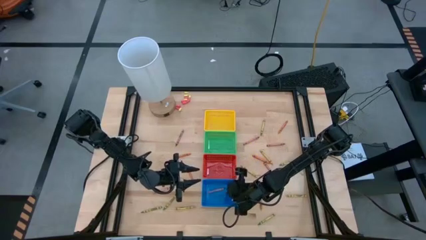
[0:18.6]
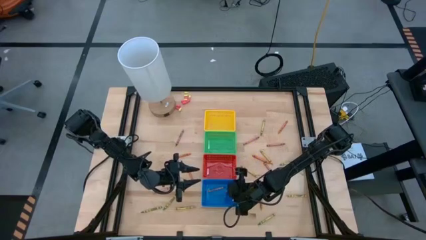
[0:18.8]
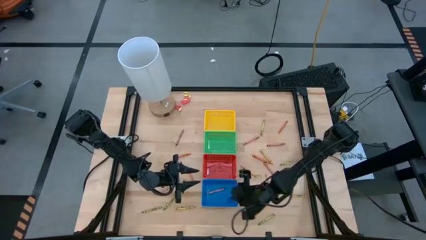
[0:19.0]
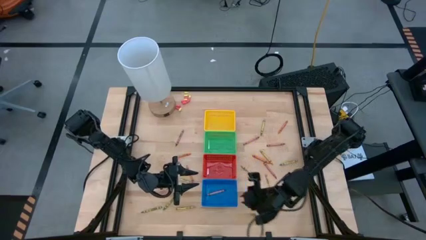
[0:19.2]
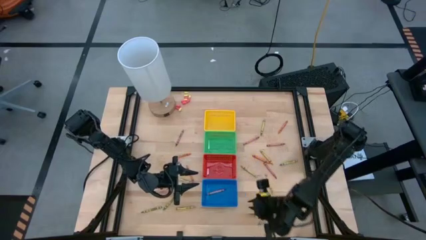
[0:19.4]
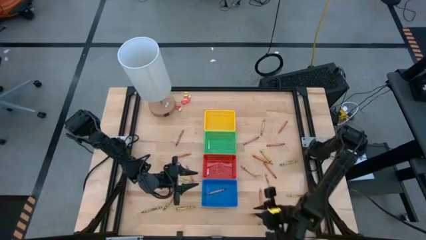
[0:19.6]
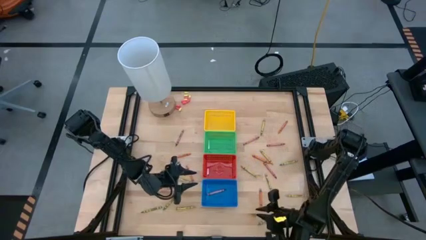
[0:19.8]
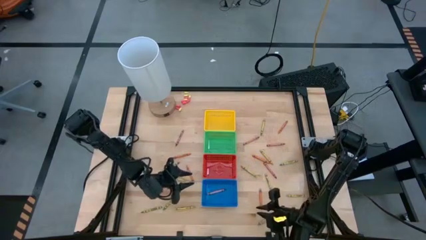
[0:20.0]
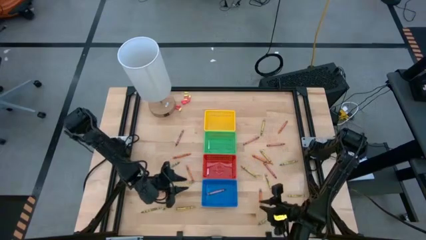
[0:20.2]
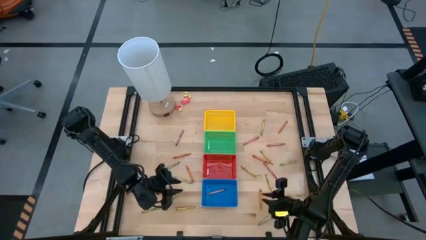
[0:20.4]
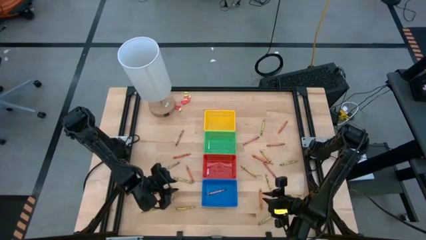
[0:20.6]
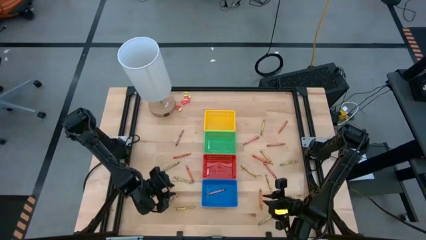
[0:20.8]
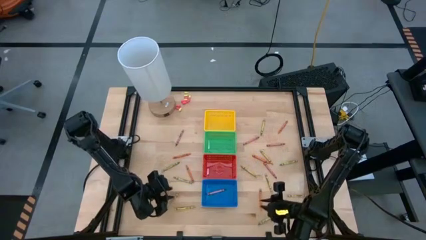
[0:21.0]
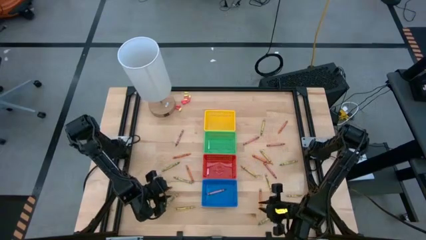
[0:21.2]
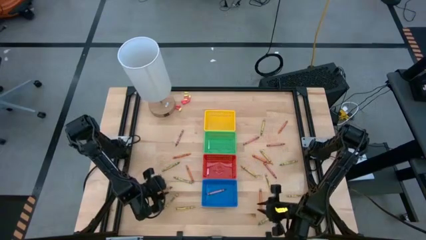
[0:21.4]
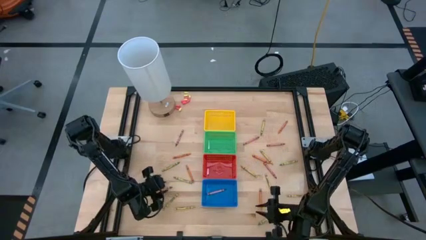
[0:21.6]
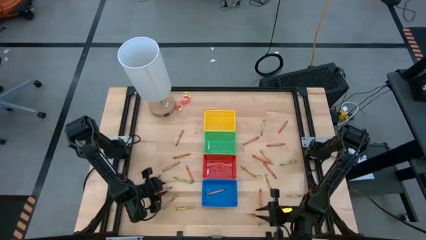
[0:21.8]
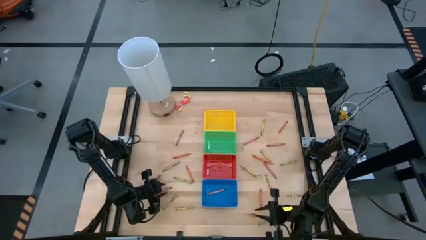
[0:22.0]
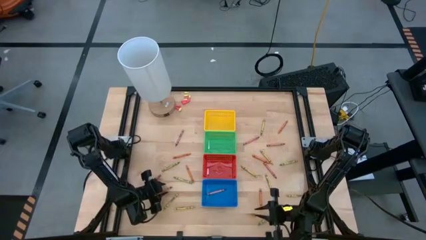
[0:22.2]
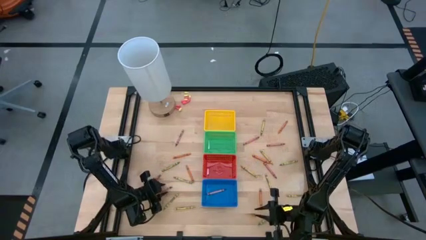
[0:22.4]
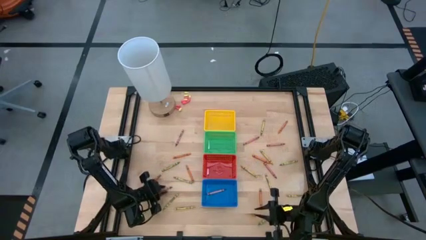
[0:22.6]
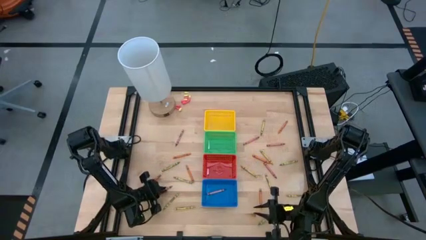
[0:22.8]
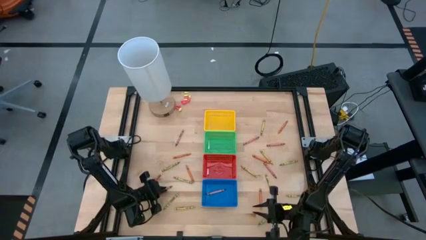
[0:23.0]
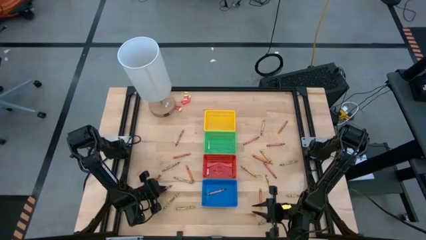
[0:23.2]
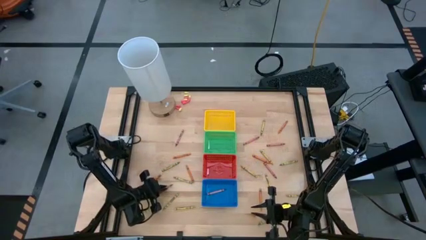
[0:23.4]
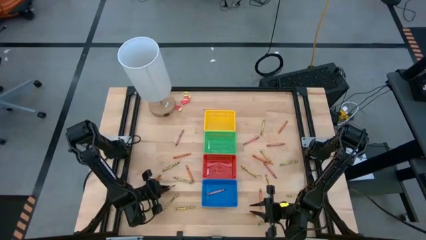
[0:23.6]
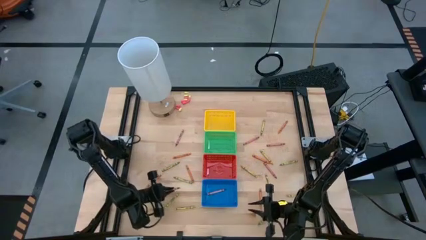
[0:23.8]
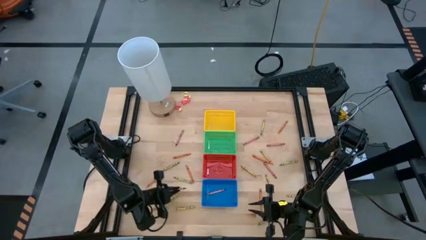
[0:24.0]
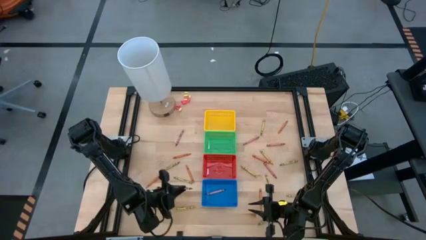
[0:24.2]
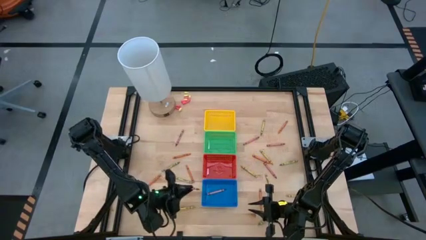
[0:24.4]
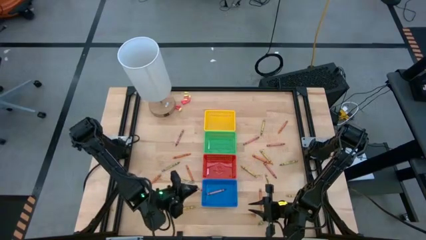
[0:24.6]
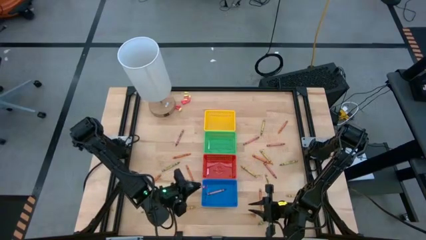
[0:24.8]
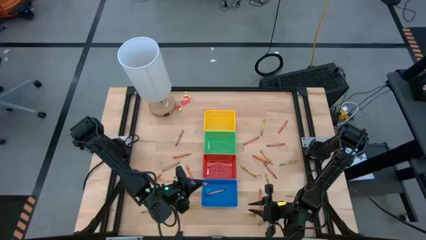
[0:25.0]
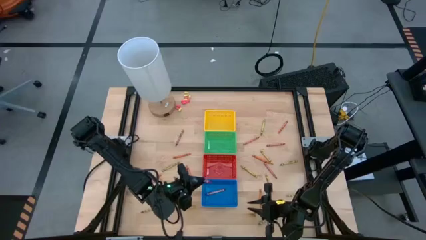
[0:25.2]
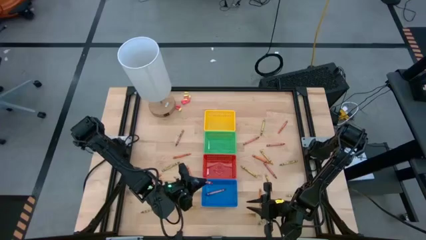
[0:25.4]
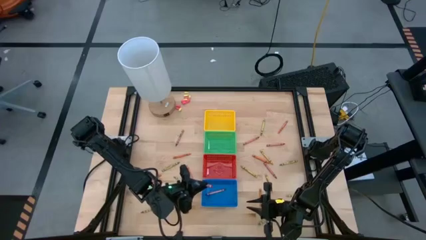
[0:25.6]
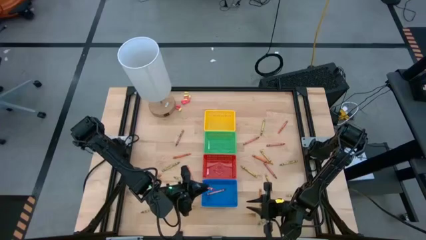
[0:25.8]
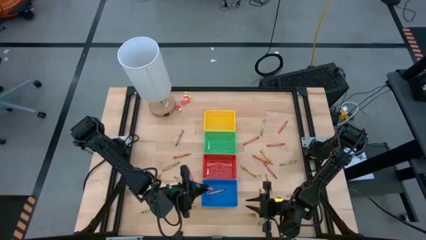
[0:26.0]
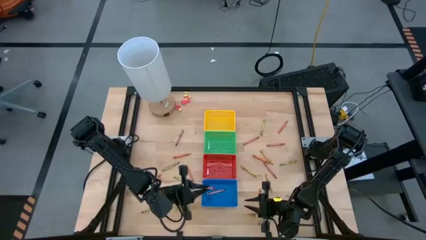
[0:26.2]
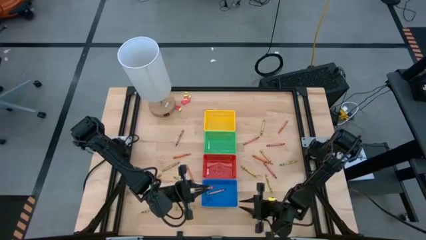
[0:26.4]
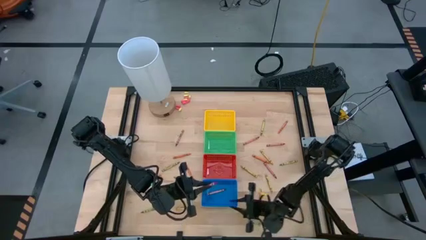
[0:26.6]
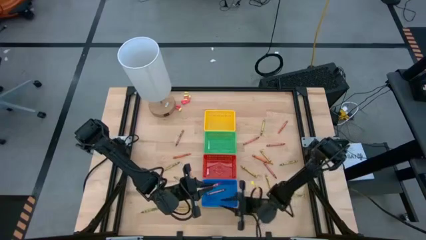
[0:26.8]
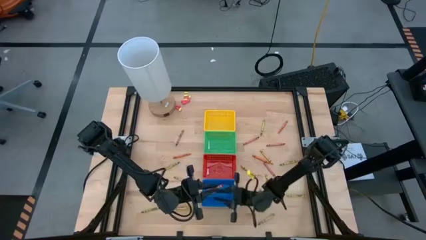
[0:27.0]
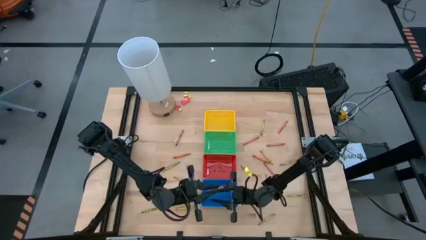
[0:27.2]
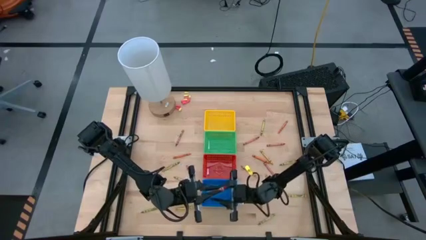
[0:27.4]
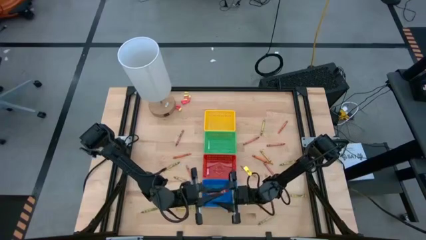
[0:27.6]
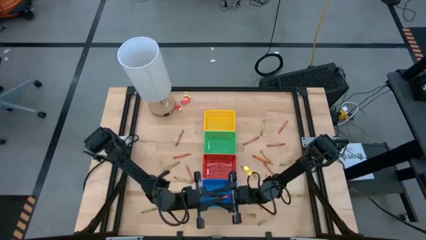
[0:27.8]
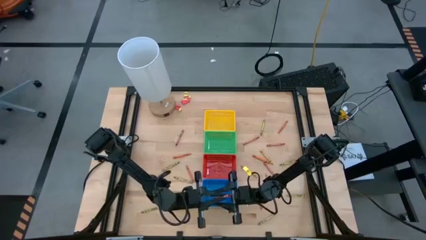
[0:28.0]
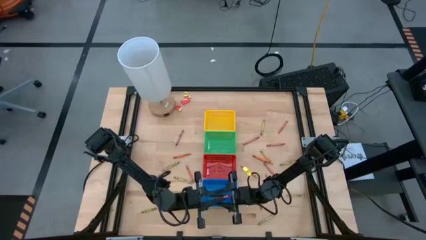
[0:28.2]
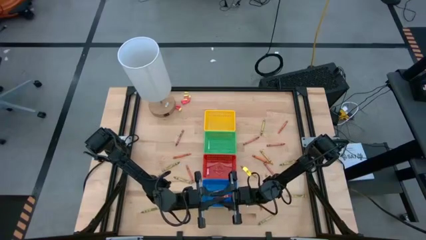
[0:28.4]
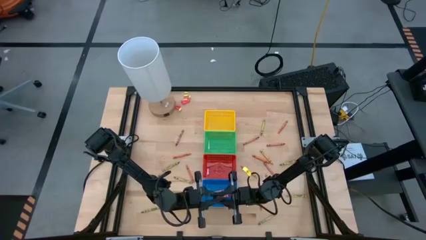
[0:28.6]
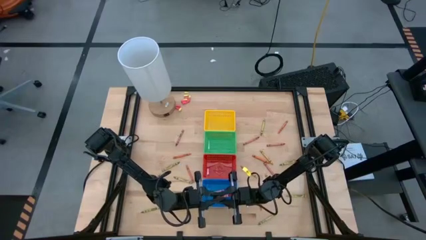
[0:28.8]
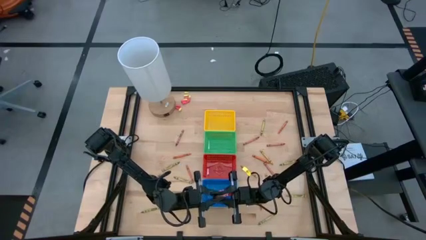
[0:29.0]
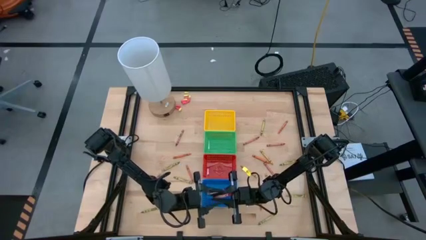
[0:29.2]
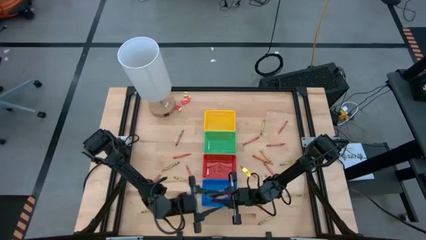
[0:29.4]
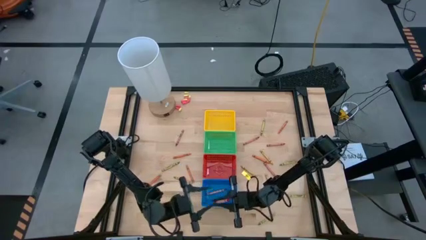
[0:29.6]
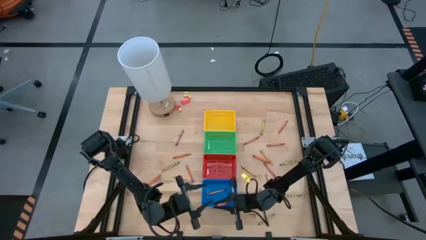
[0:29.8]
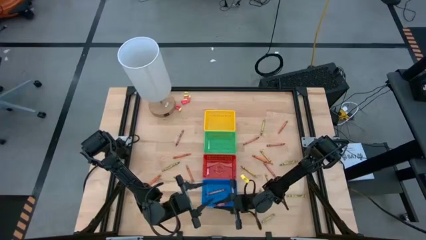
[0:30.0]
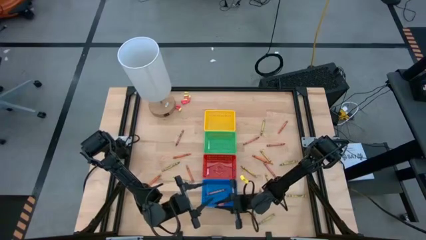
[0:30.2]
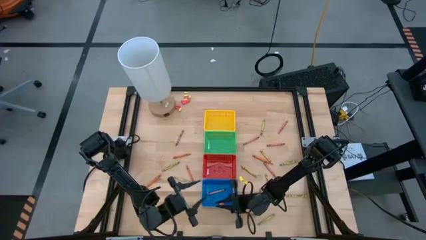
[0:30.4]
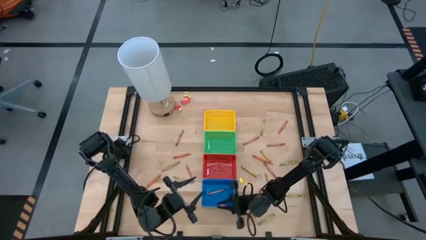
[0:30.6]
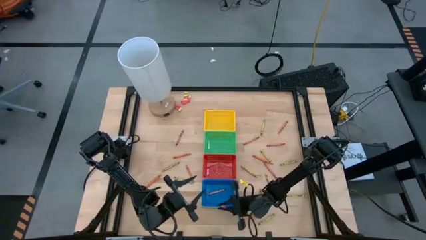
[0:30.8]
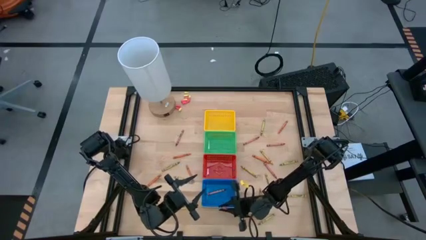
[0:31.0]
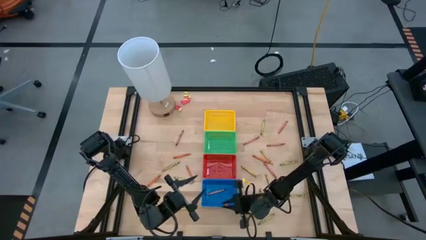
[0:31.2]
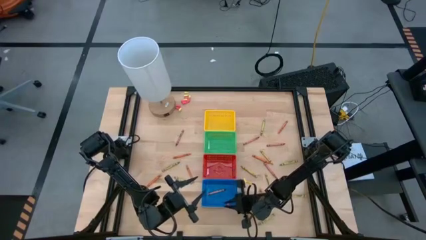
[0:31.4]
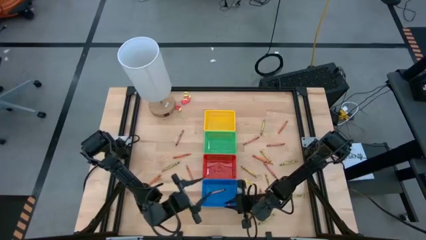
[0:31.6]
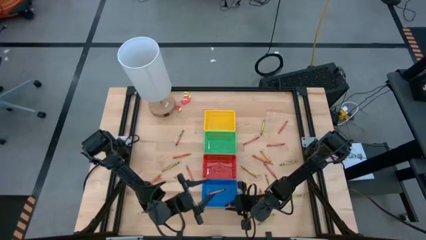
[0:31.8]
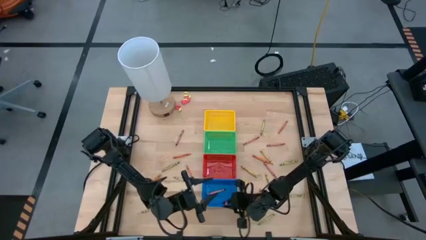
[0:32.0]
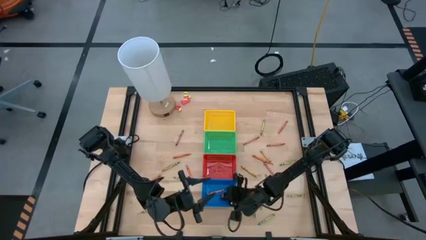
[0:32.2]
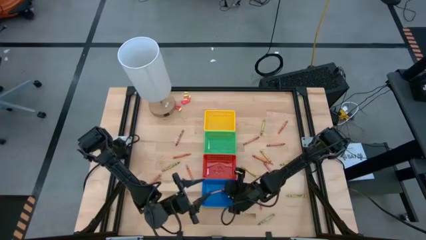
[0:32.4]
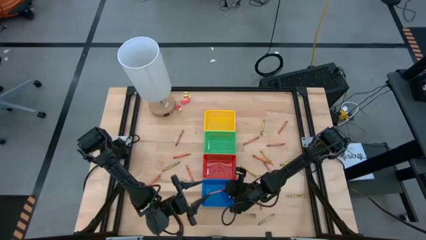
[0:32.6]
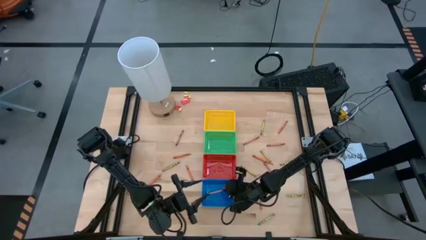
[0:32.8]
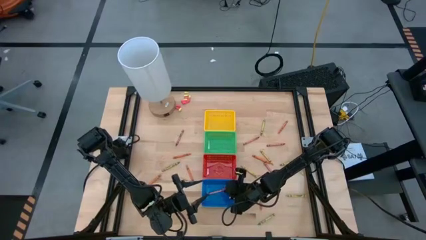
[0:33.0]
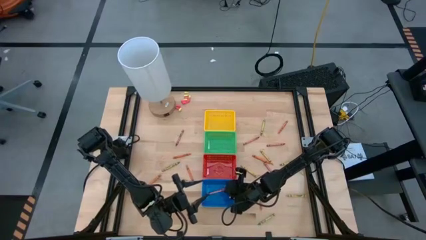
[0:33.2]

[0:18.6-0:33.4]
Task: Sort crayons
Put the red crayon into the blue bin

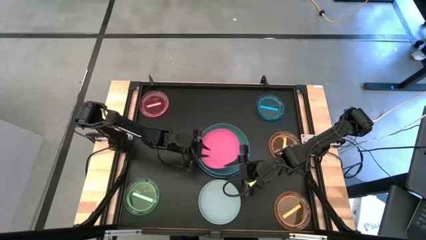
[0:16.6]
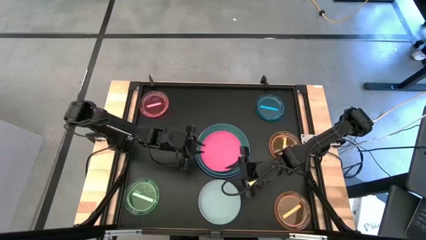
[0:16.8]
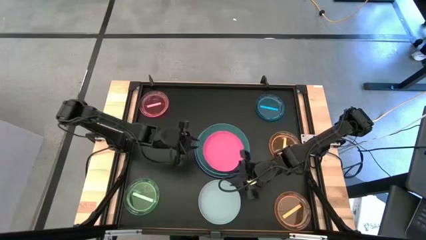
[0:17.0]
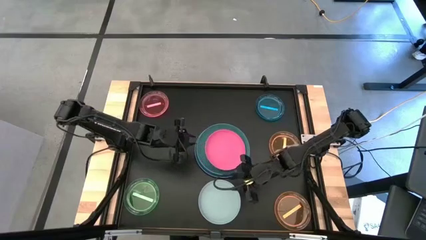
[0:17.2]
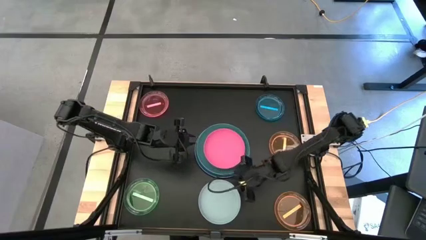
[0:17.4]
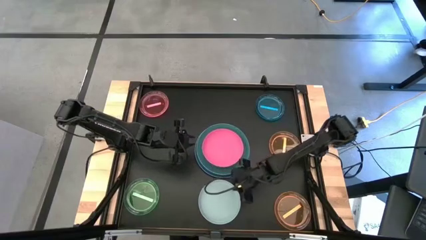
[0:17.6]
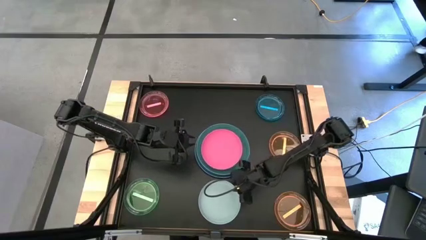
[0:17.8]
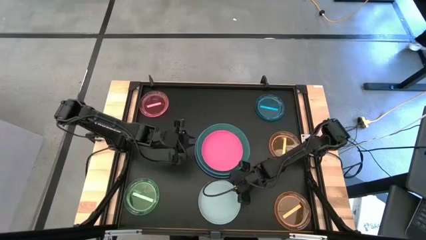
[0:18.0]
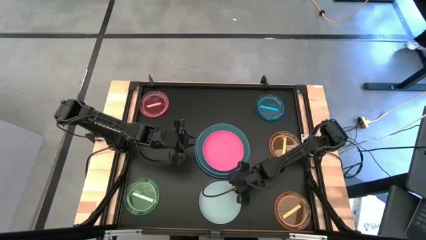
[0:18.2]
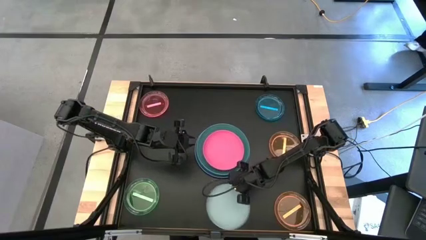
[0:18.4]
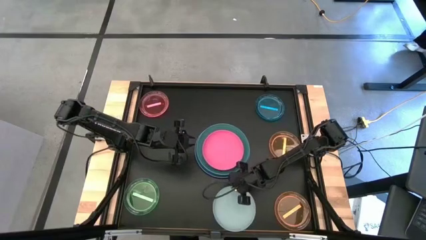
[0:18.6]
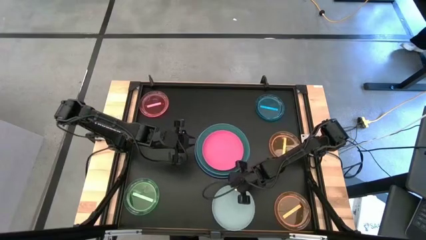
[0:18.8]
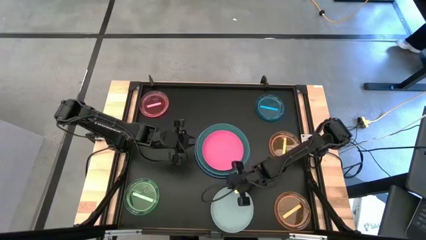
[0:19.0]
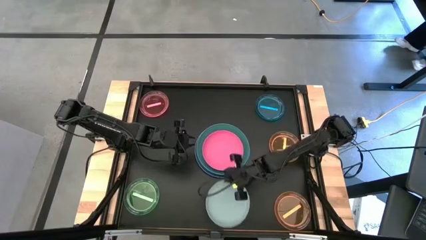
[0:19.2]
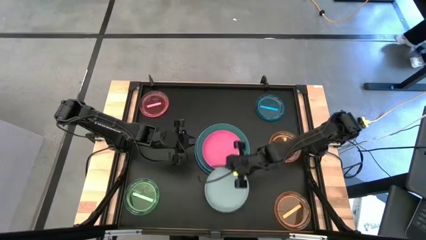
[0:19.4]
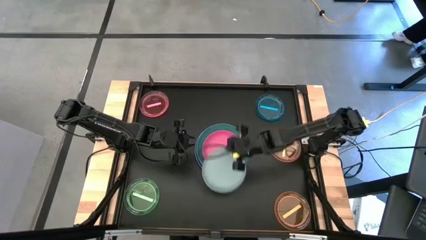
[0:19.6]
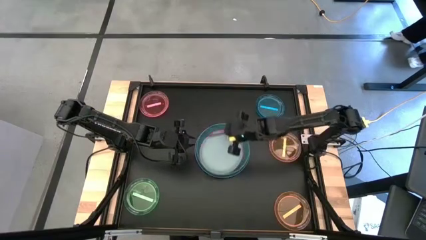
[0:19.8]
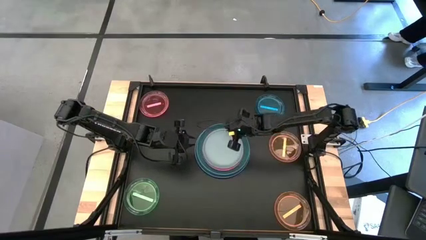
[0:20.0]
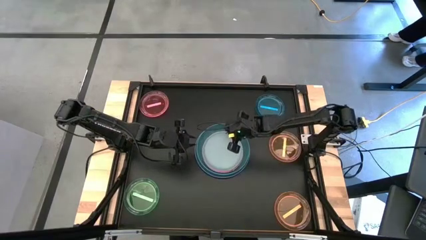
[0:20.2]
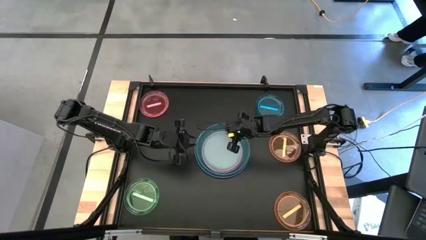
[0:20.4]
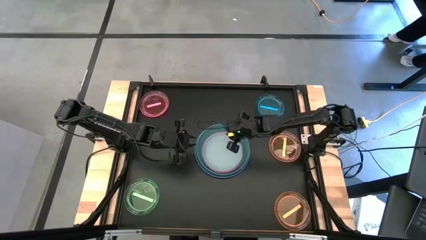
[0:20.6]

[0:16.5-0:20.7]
Task: Stack plastic plates
Stack the gray plate on top of the pink plate
